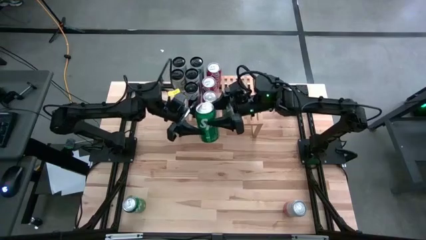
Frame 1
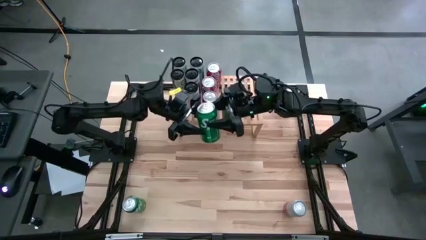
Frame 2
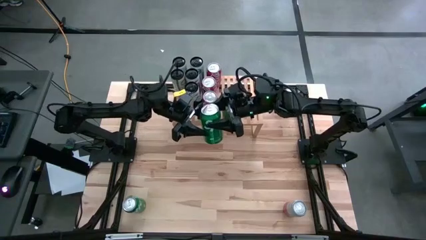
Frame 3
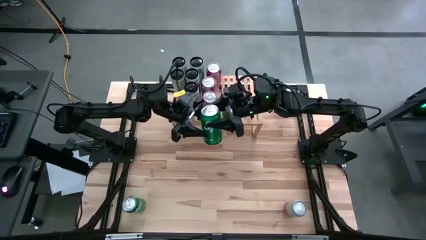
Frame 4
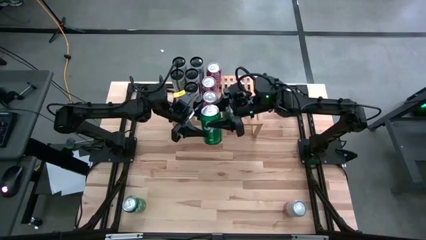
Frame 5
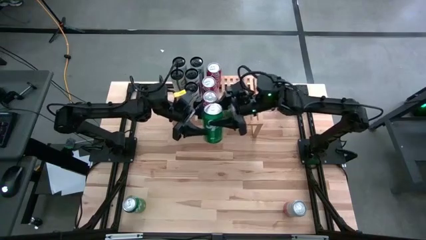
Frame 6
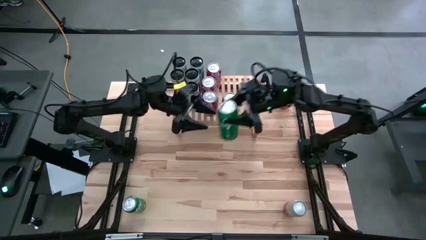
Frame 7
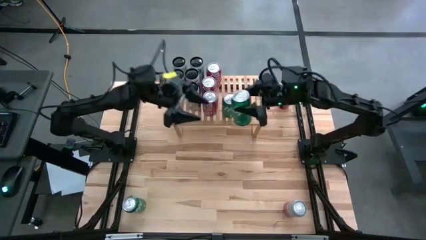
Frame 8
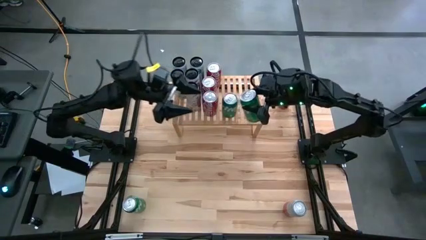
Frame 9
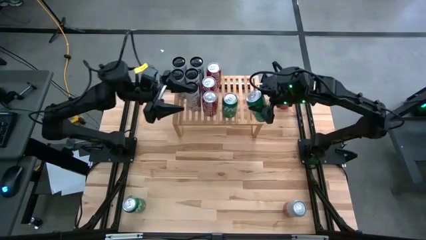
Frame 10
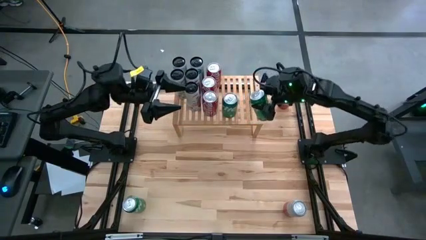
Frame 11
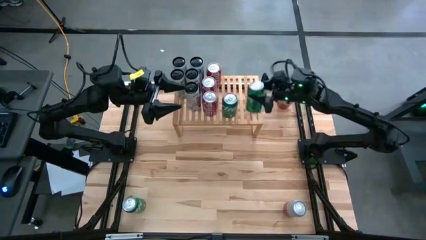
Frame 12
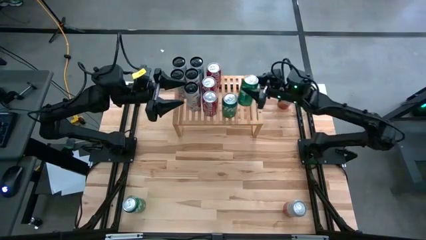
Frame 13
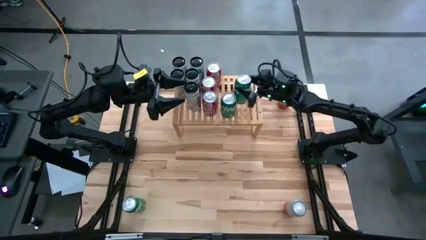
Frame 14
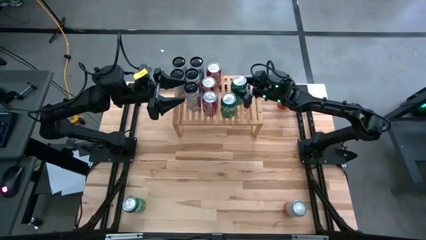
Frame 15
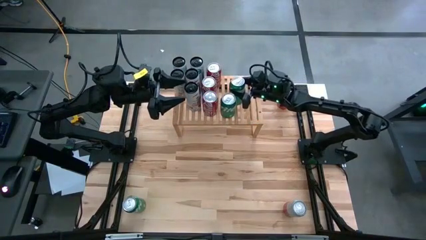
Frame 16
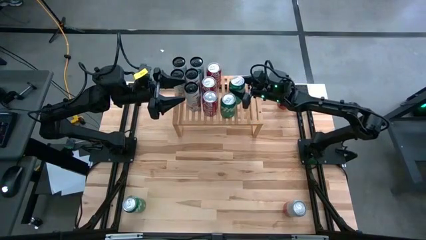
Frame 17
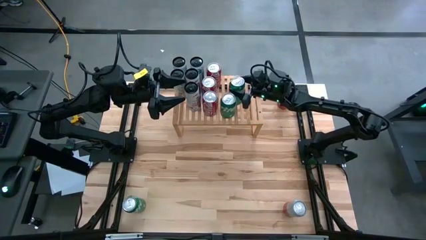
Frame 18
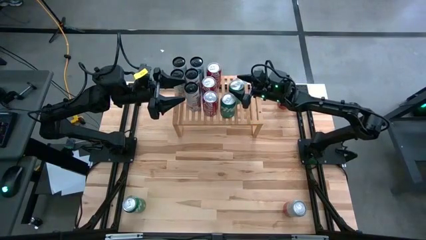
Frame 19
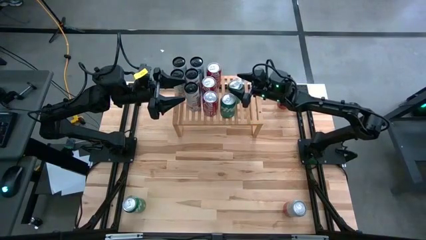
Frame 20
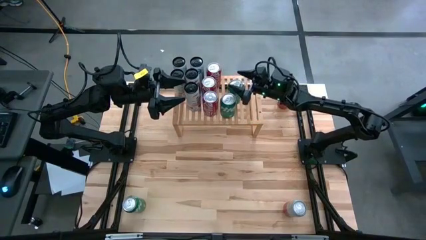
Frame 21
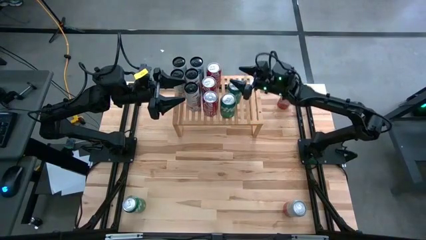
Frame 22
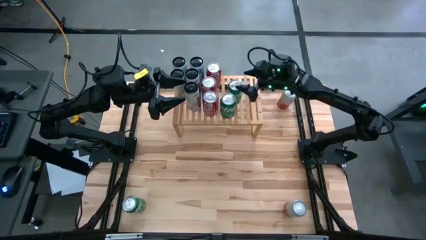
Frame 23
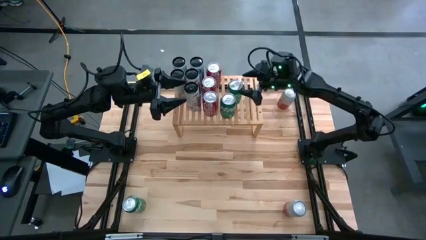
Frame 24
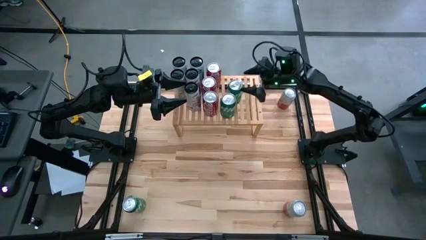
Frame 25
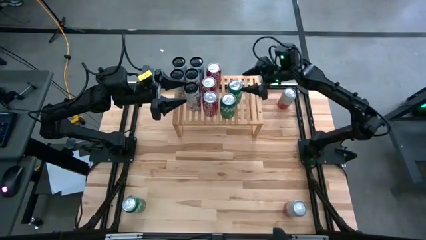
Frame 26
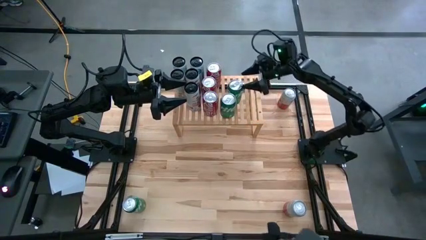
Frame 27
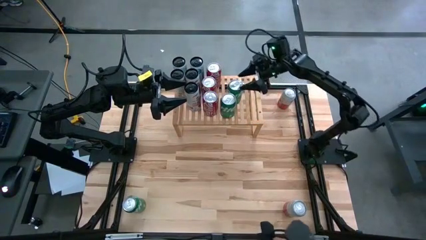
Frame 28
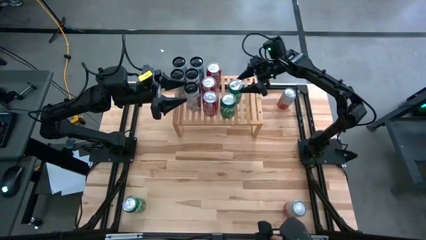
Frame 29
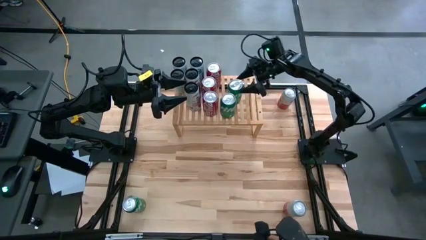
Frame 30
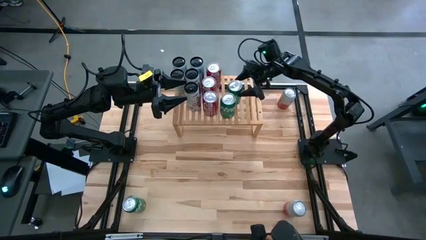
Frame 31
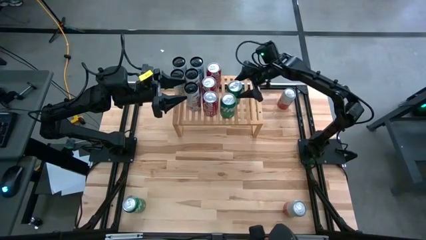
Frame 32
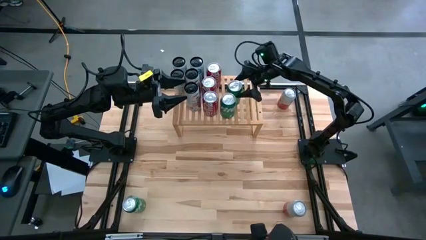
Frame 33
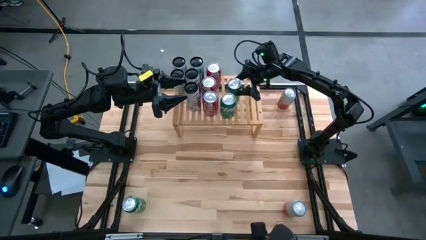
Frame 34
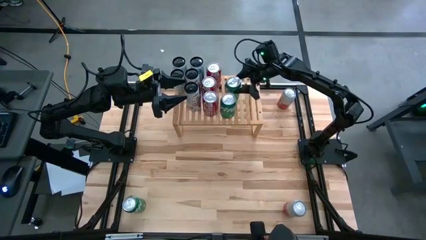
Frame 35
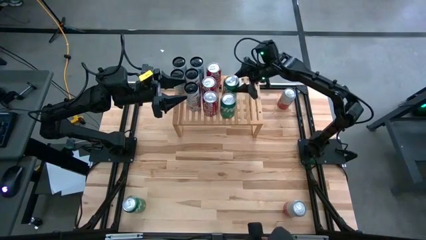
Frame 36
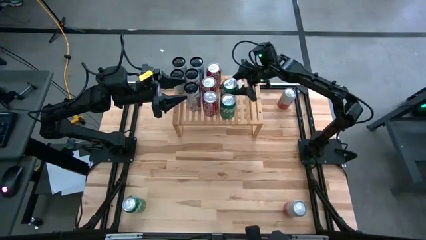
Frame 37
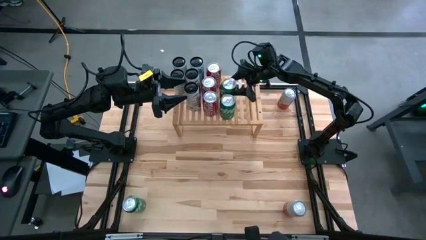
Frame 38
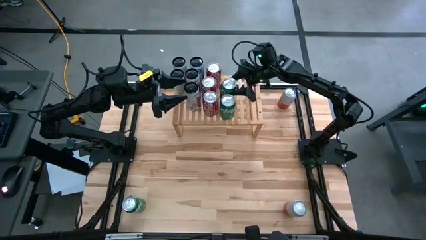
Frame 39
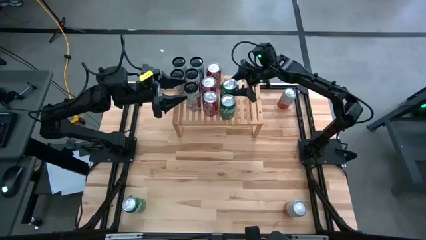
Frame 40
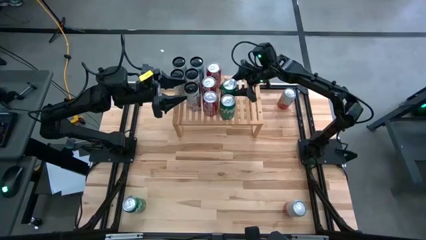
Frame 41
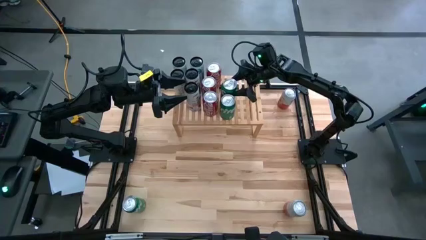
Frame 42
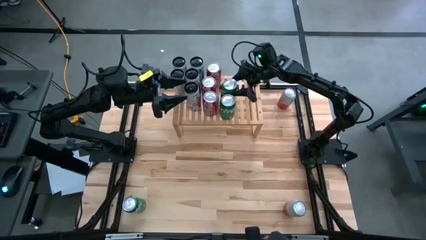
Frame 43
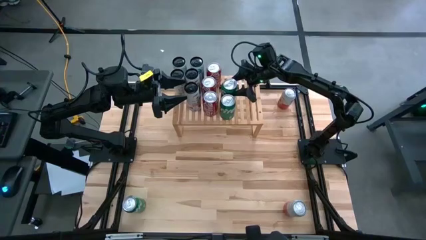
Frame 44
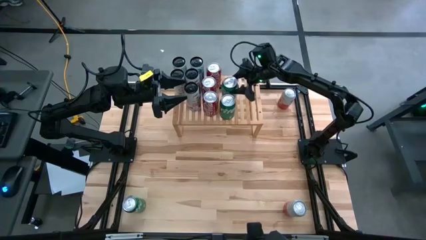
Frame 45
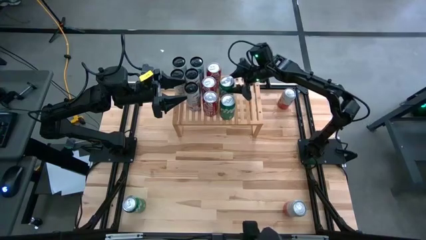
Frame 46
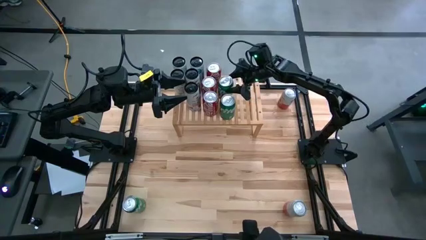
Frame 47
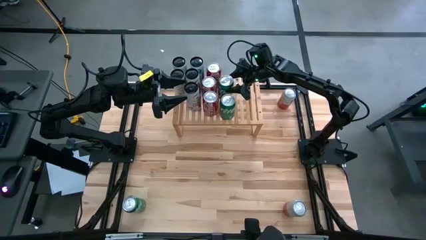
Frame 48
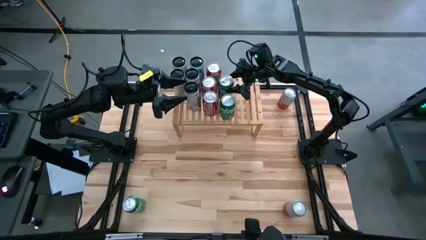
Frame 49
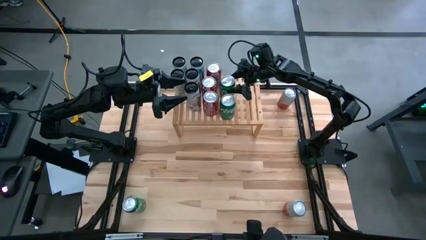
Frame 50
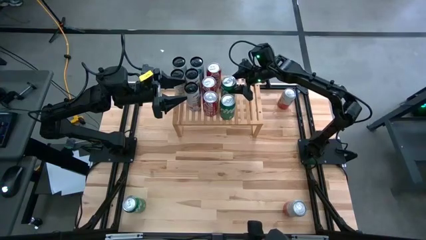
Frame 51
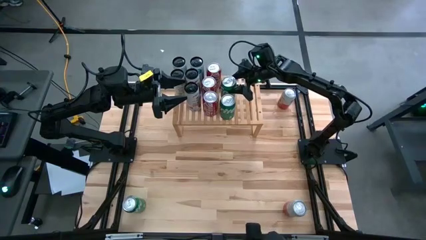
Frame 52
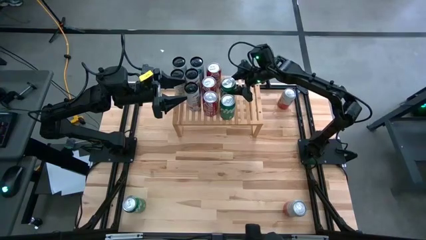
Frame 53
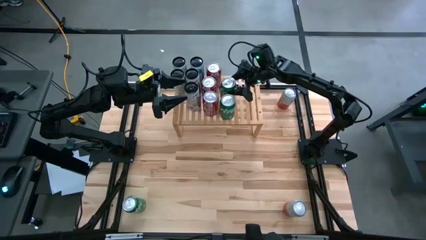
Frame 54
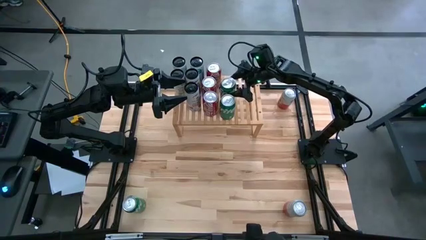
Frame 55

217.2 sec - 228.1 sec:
Task: Place canned beverage on shelf
Put the right green soda can on the shelf aligned with other green soda can
